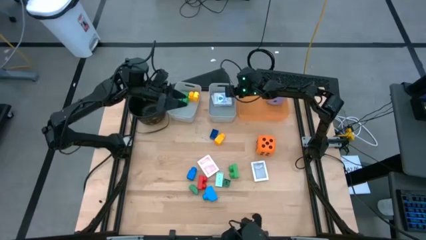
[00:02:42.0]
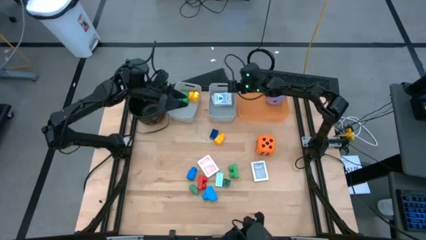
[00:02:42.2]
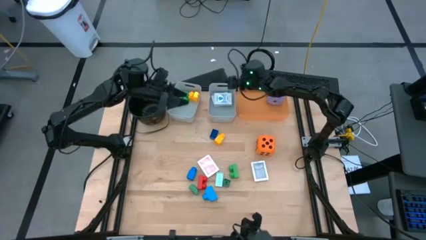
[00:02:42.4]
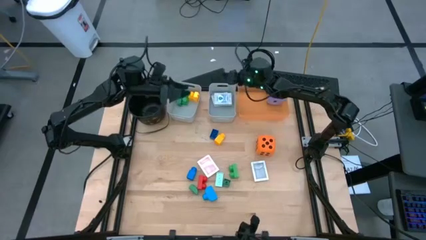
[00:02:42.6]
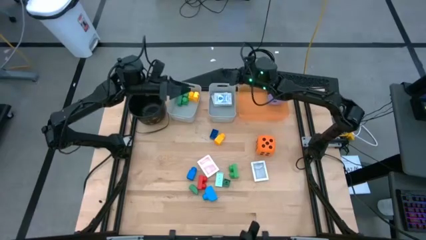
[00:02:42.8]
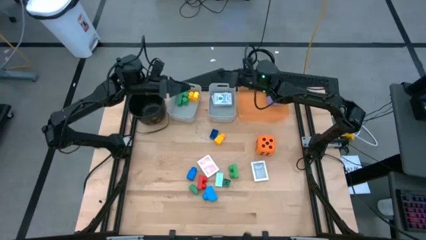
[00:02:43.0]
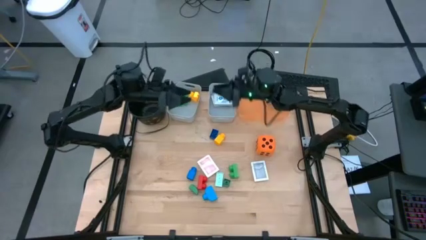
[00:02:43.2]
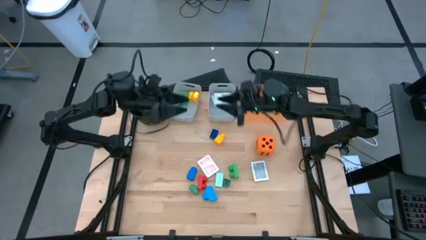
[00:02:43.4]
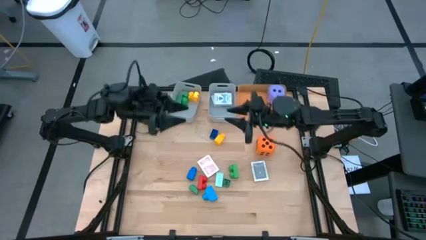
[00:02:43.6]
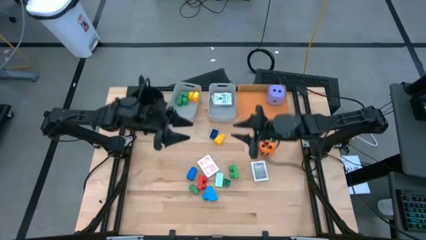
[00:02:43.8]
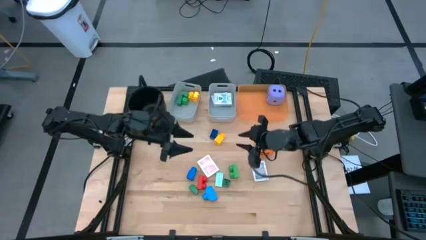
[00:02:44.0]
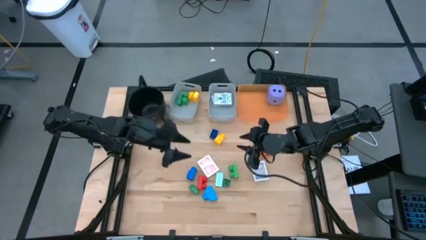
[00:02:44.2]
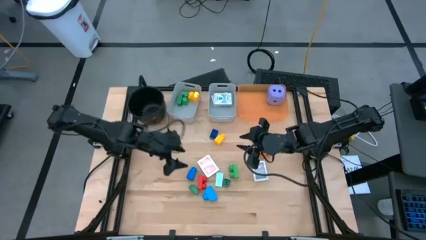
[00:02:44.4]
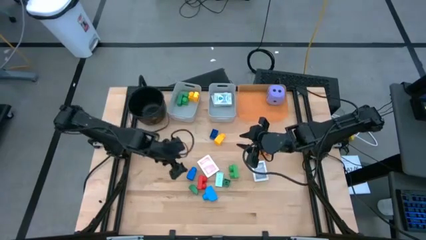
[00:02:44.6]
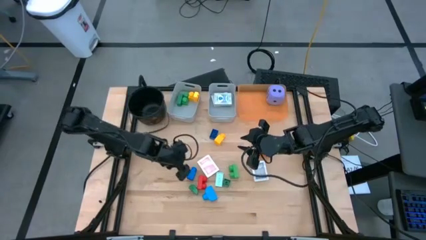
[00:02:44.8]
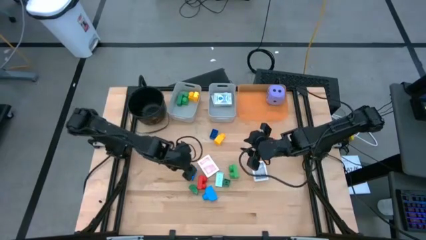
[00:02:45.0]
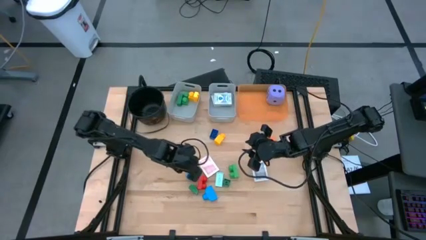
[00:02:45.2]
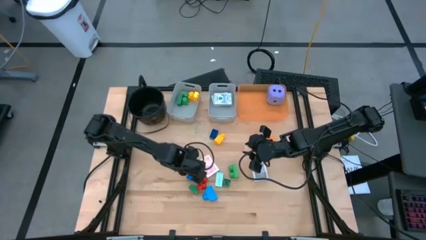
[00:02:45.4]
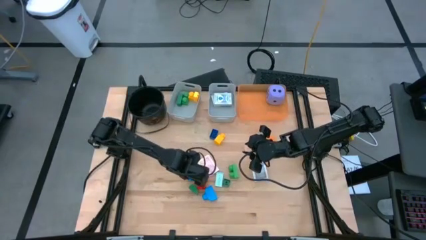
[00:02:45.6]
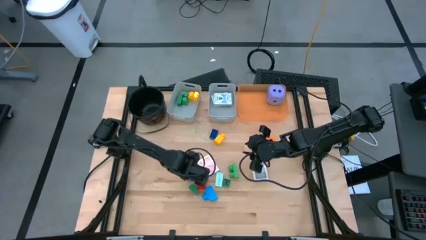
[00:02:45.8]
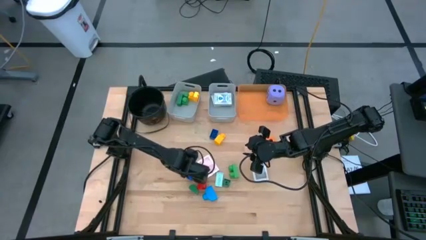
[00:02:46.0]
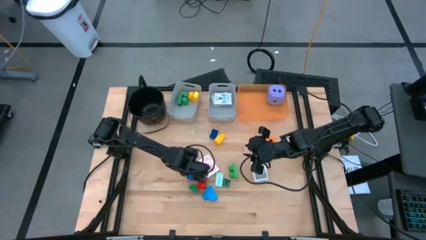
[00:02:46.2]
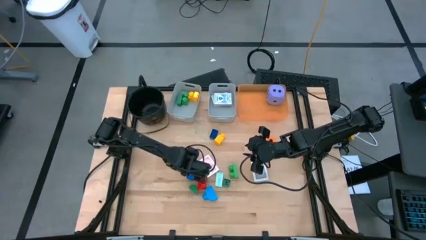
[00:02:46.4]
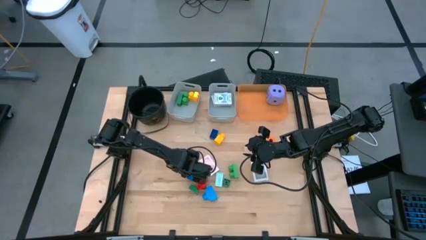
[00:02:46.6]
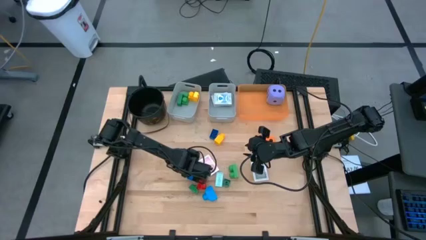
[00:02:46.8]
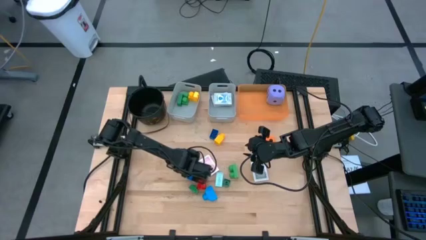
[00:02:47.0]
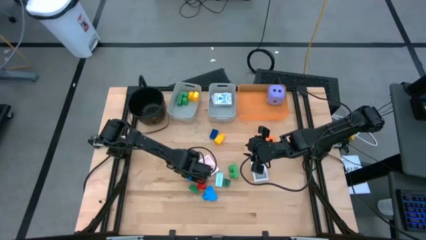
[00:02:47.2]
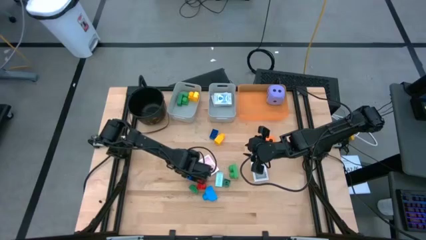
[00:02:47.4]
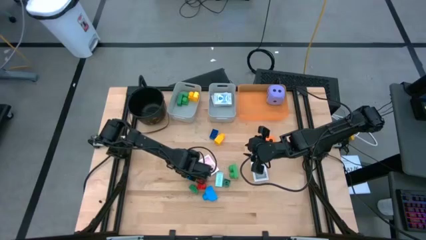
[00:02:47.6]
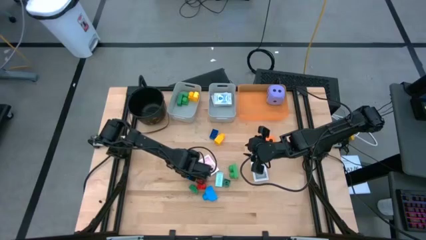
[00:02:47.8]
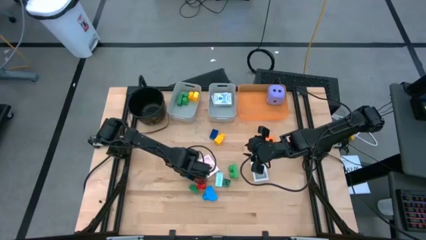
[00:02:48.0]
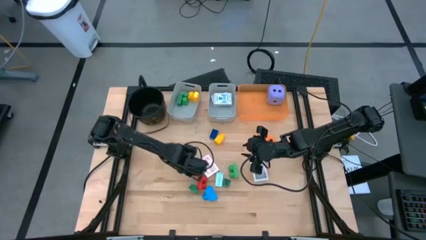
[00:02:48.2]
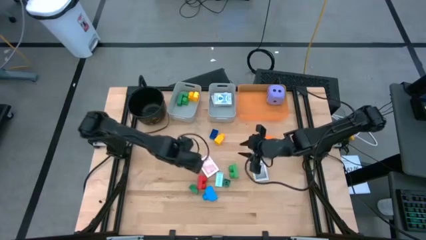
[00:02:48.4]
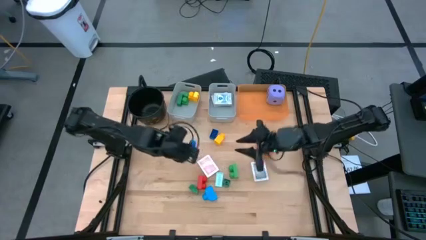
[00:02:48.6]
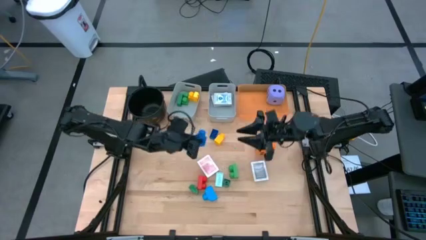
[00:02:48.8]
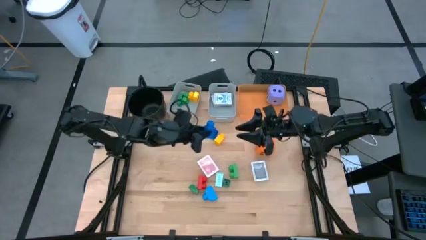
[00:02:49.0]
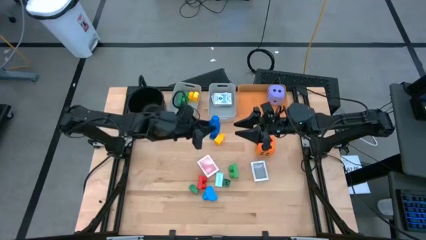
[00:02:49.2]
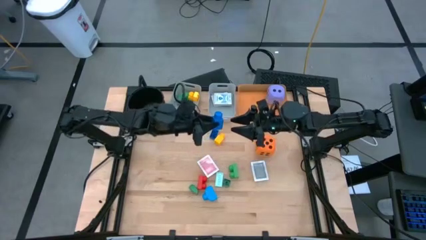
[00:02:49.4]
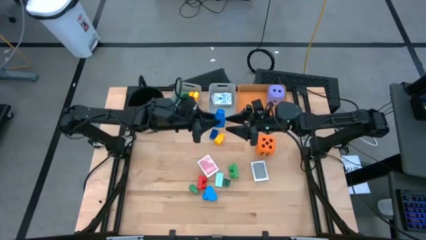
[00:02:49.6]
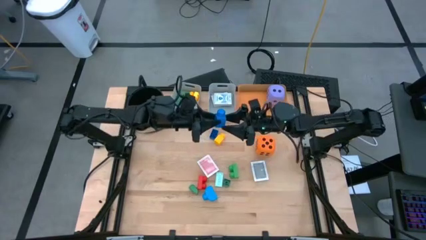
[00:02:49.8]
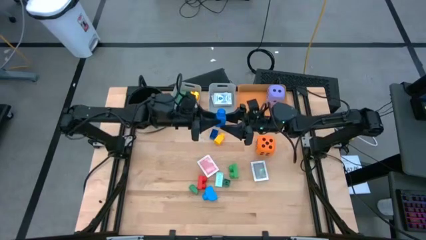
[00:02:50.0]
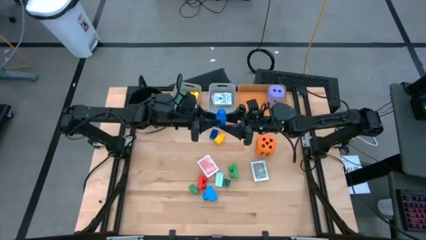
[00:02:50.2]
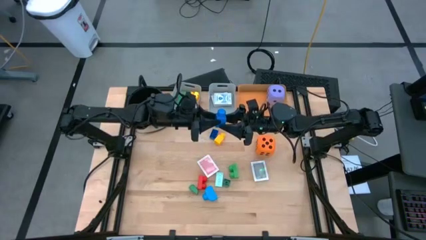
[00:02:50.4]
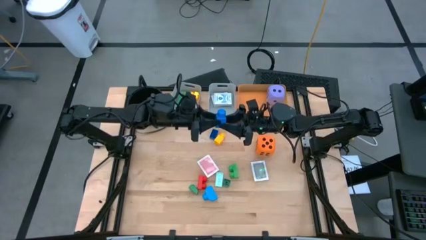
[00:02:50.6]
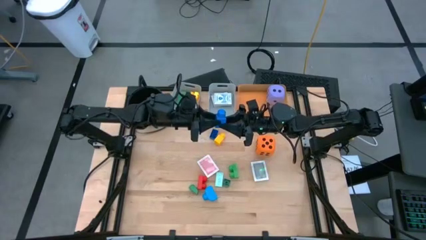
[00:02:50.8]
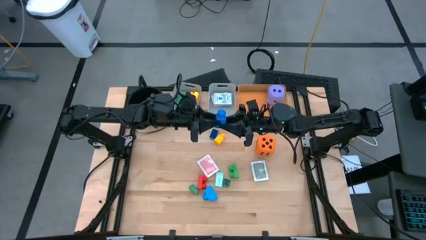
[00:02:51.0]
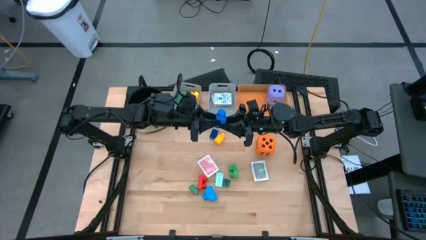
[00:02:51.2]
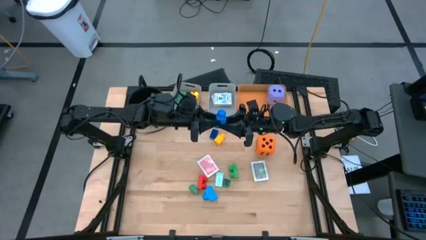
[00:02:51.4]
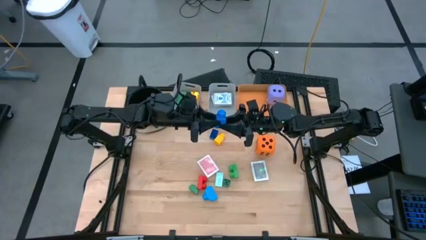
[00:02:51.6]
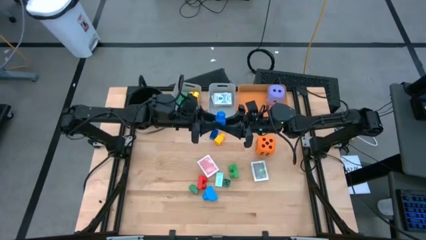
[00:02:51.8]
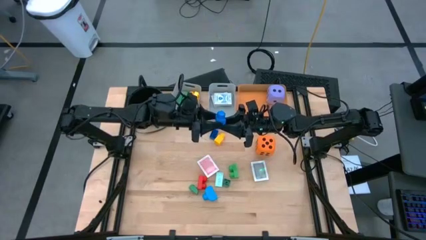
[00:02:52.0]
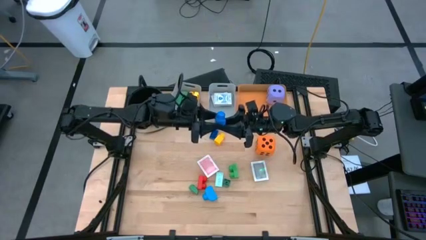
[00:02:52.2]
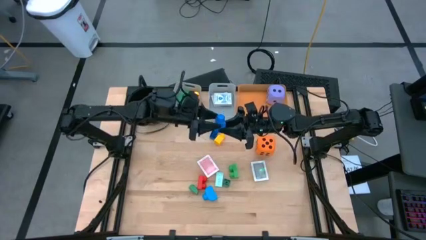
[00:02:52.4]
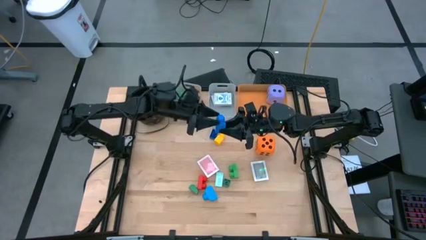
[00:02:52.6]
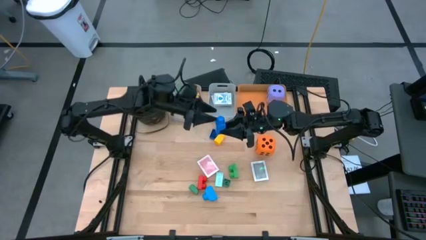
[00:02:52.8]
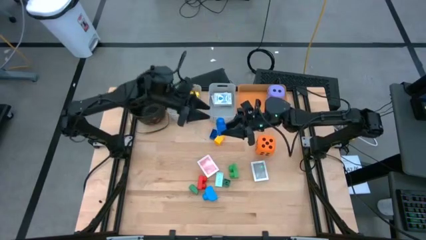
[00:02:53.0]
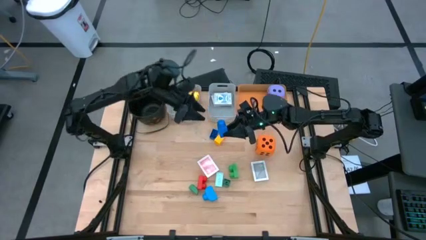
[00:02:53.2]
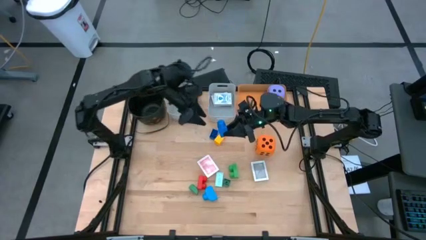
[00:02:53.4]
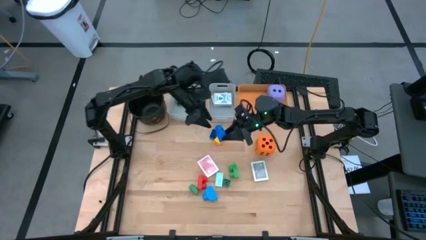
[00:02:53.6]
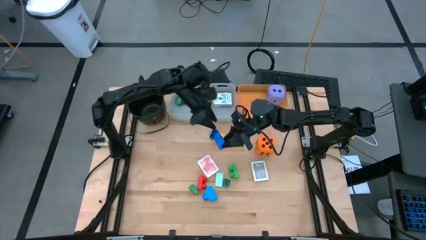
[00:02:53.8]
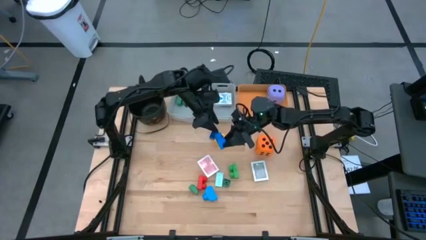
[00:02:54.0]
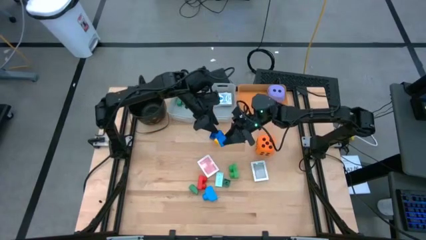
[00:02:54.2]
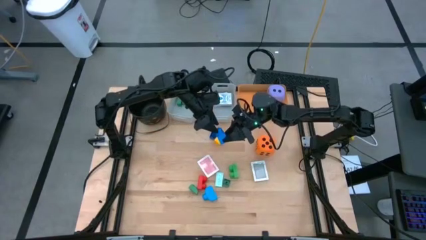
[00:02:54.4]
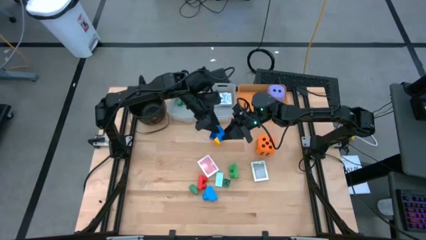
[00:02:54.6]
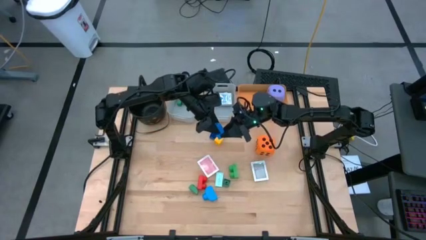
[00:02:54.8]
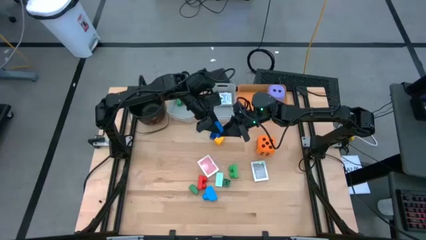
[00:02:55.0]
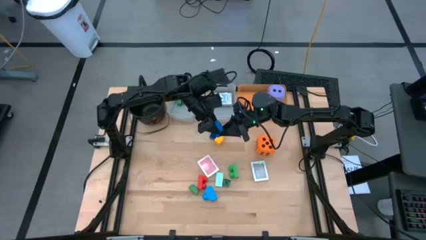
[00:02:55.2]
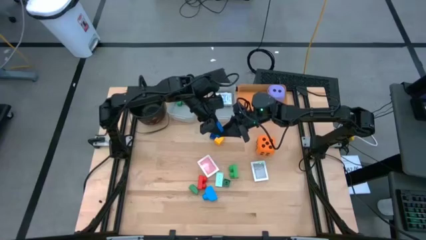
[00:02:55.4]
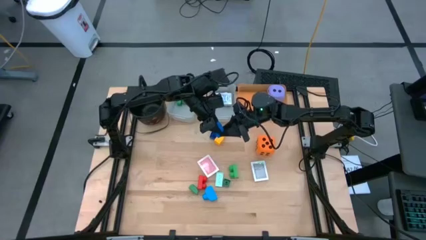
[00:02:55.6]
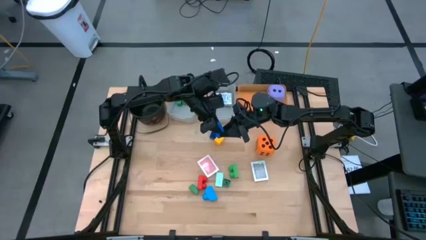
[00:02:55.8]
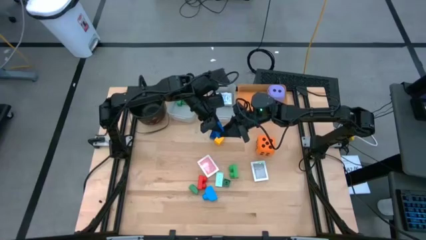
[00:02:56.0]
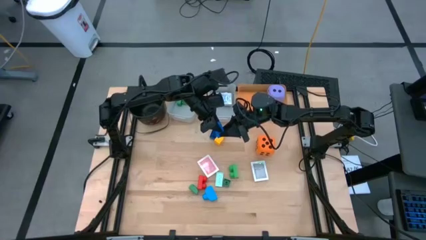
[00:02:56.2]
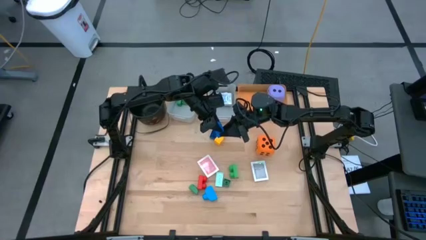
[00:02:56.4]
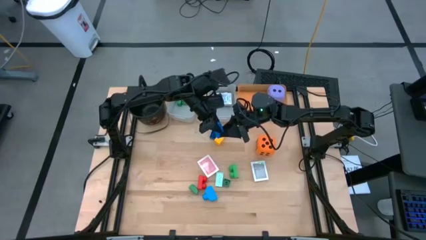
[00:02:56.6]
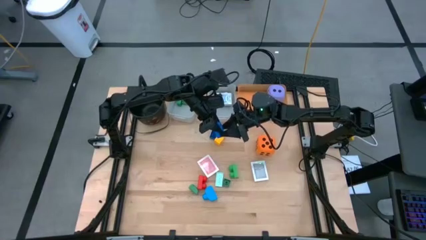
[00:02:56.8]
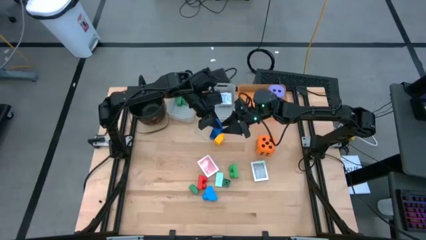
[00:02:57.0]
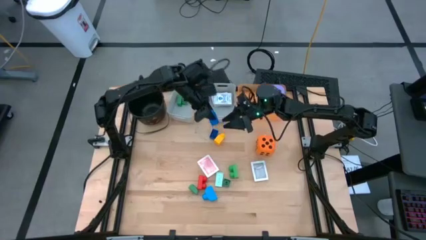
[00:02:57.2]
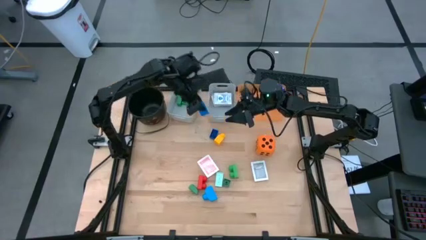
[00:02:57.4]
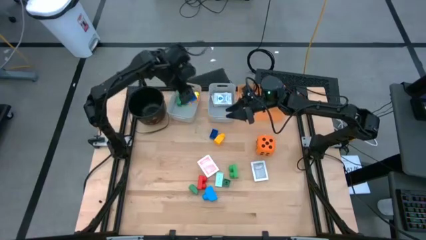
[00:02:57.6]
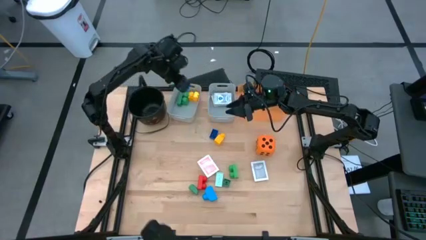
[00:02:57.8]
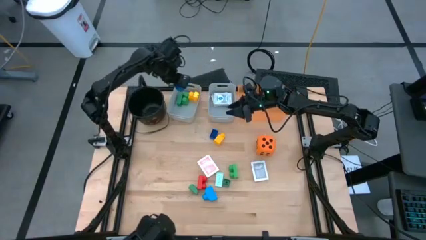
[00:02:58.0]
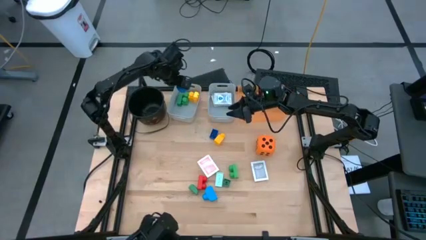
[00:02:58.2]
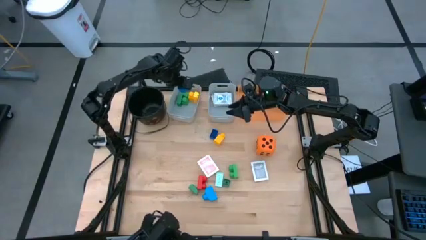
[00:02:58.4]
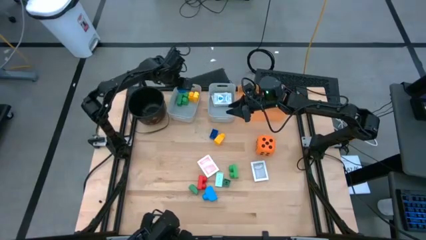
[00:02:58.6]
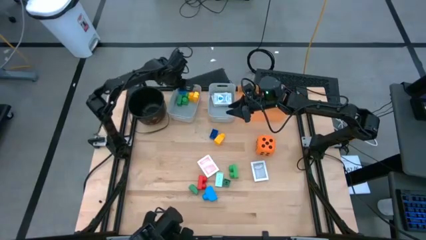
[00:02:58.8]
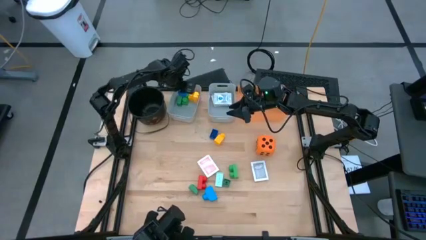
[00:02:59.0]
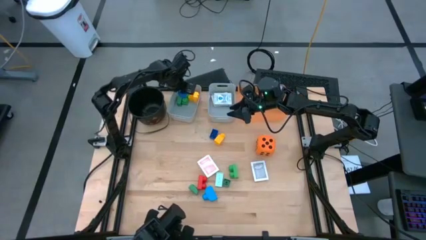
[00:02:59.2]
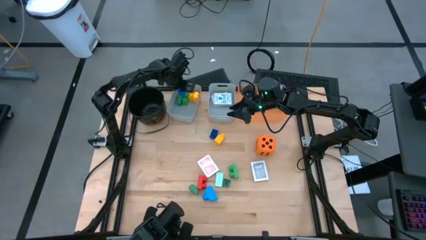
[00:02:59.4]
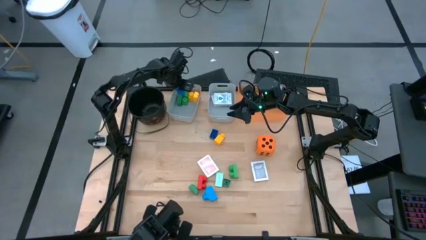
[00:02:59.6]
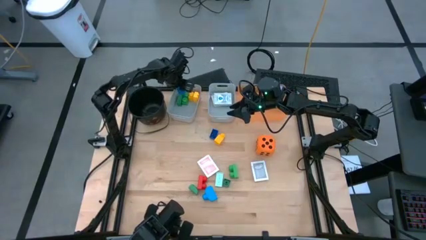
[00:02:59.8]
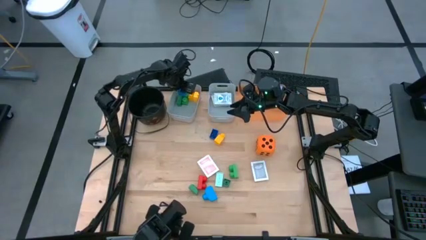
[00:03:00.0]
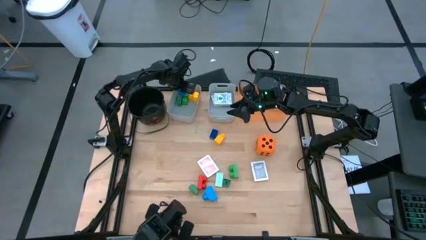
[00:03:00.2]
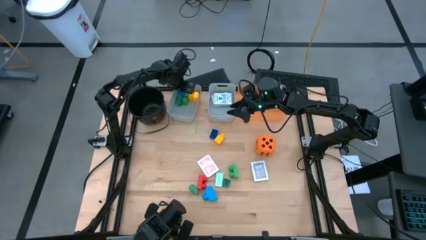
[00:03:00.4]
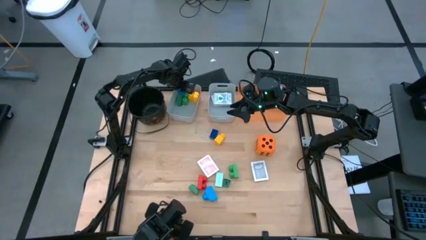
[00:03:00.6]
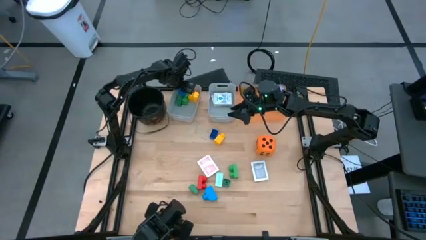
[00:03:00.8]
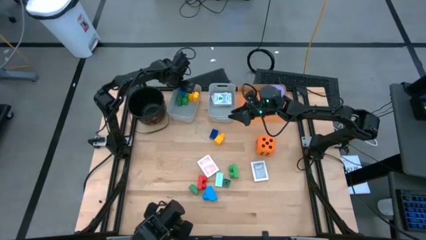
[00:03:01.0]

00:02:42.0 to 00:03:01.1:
Task: Pick & Place Toys
Put the blue game piece into the left gray bin
